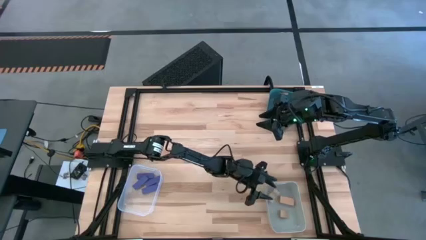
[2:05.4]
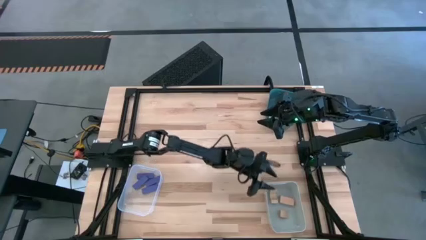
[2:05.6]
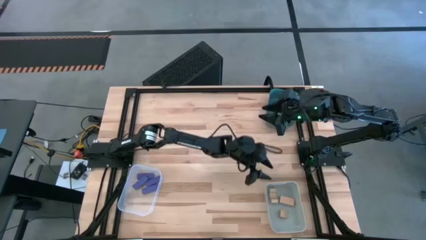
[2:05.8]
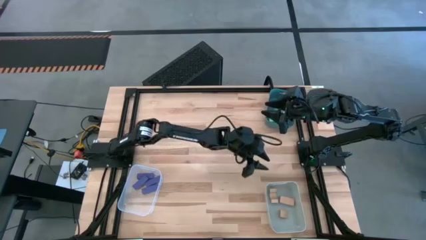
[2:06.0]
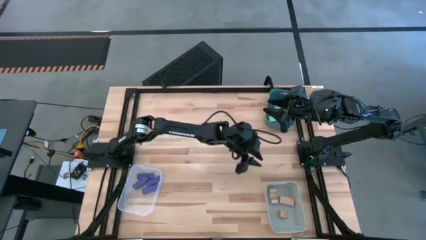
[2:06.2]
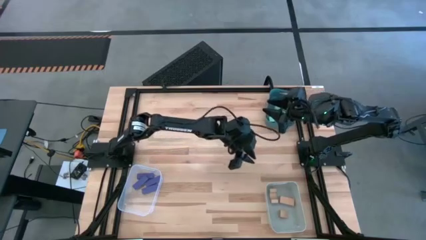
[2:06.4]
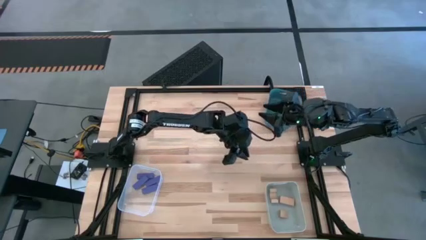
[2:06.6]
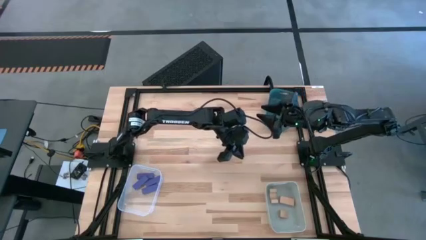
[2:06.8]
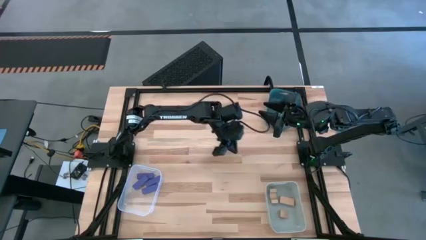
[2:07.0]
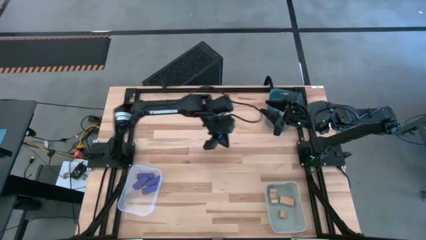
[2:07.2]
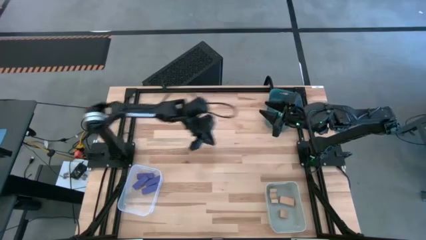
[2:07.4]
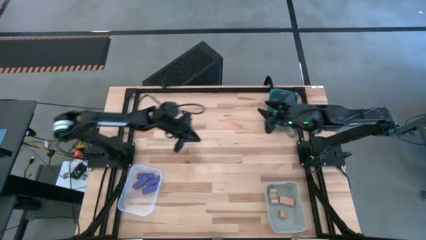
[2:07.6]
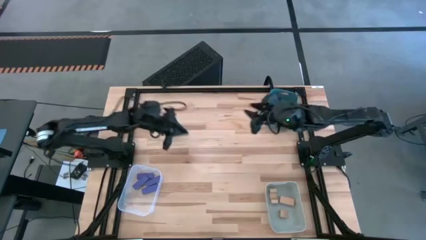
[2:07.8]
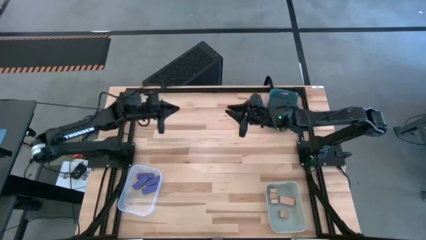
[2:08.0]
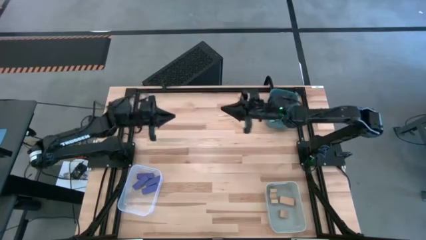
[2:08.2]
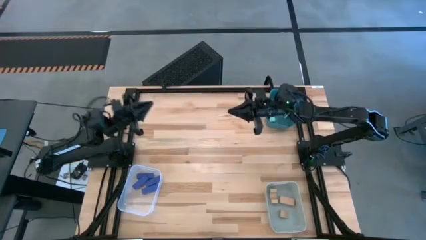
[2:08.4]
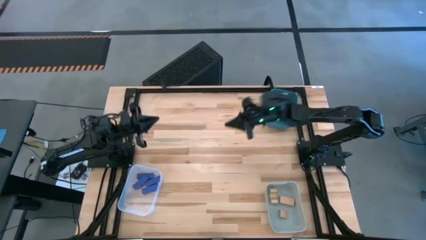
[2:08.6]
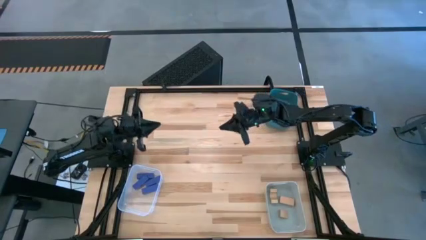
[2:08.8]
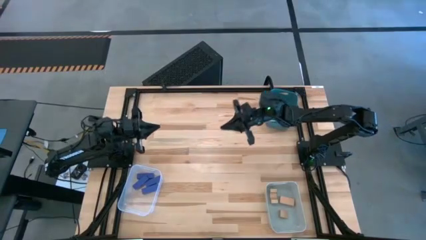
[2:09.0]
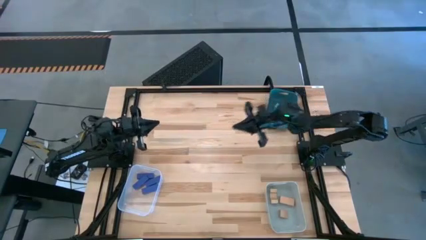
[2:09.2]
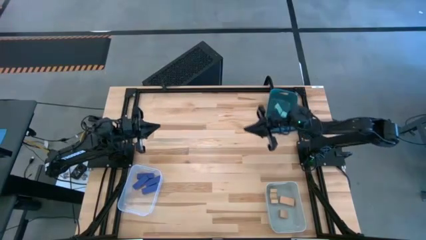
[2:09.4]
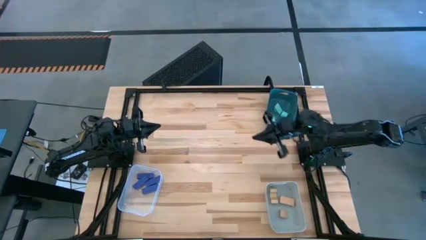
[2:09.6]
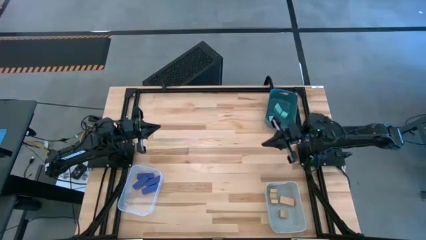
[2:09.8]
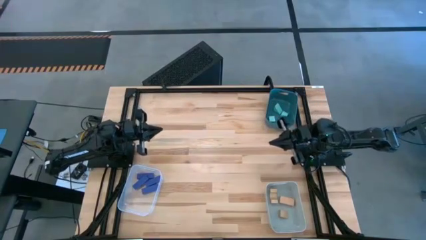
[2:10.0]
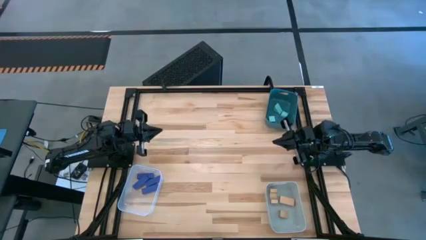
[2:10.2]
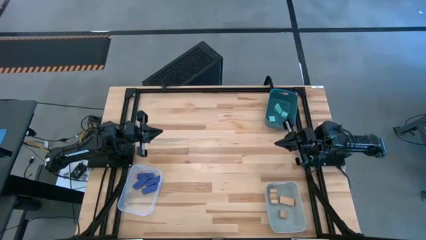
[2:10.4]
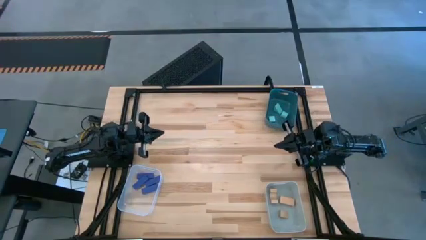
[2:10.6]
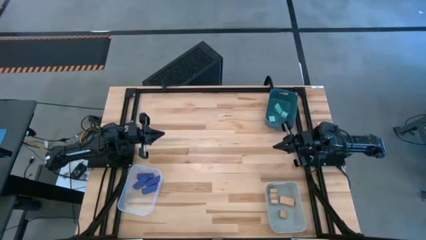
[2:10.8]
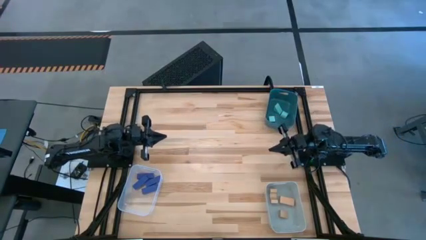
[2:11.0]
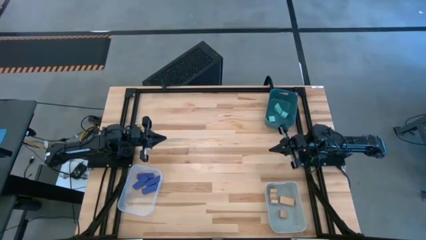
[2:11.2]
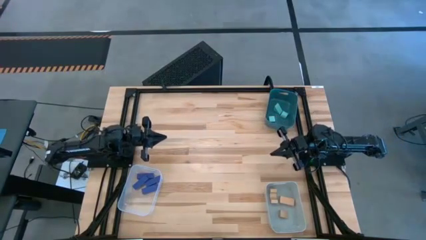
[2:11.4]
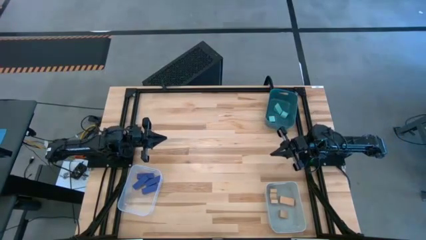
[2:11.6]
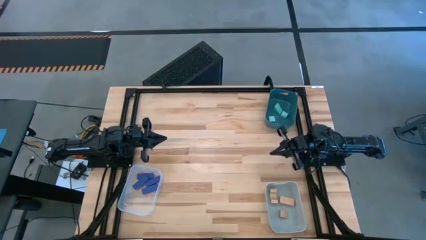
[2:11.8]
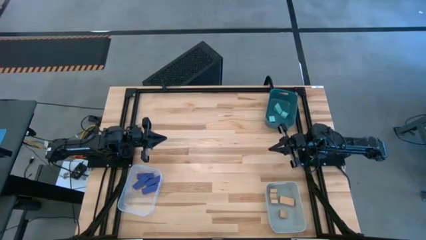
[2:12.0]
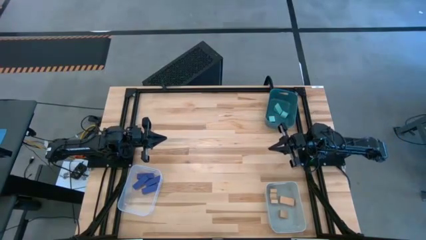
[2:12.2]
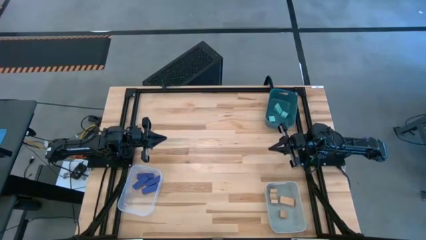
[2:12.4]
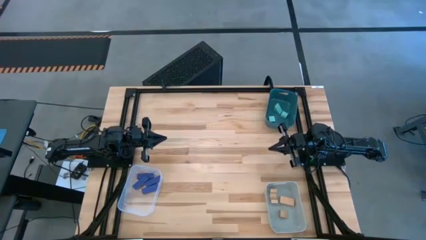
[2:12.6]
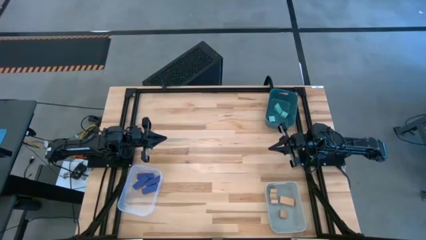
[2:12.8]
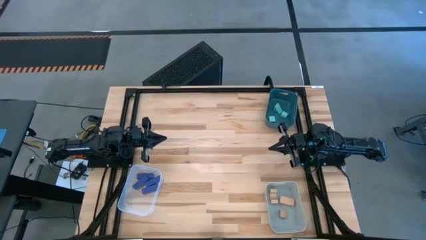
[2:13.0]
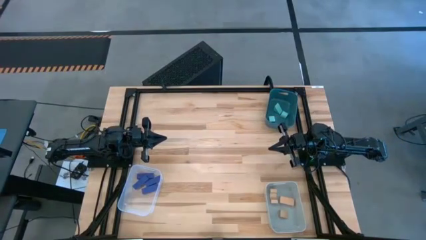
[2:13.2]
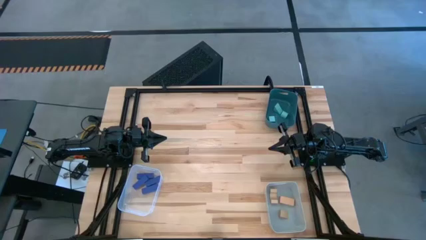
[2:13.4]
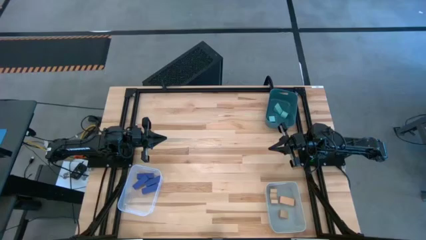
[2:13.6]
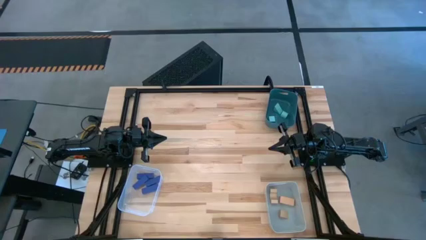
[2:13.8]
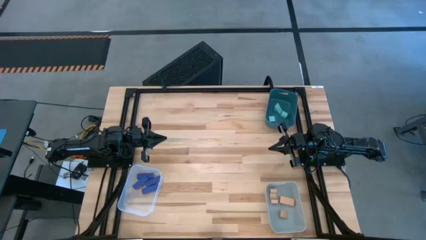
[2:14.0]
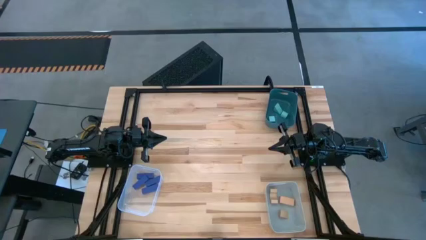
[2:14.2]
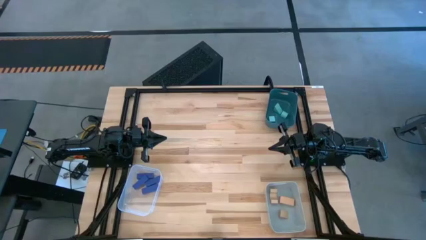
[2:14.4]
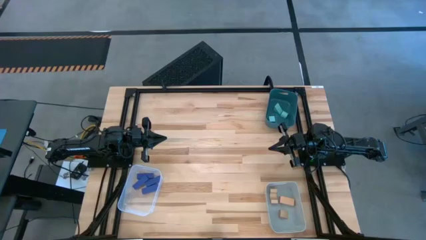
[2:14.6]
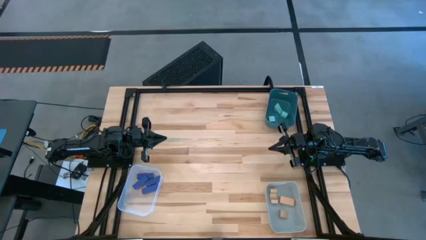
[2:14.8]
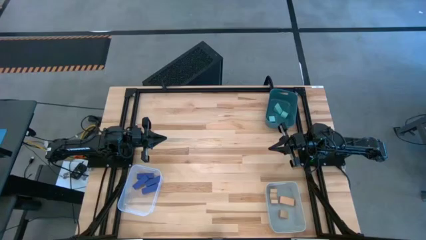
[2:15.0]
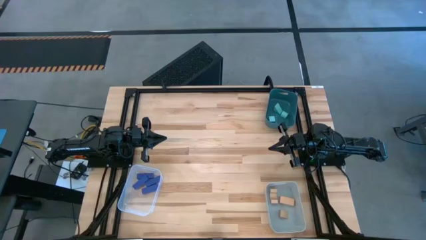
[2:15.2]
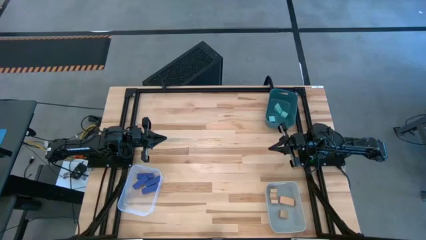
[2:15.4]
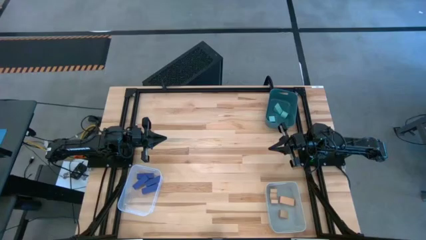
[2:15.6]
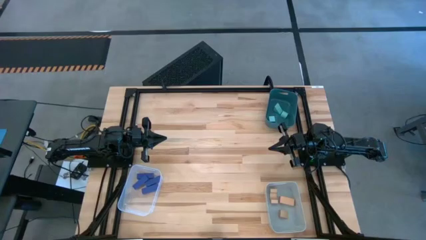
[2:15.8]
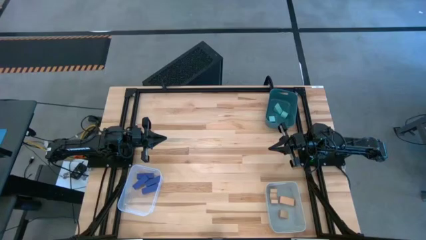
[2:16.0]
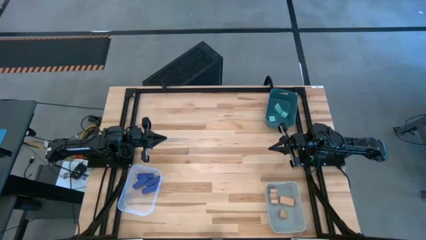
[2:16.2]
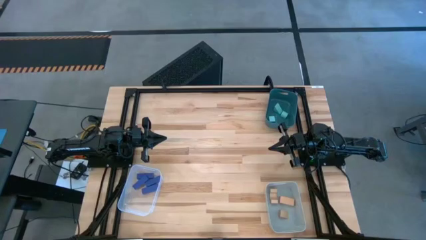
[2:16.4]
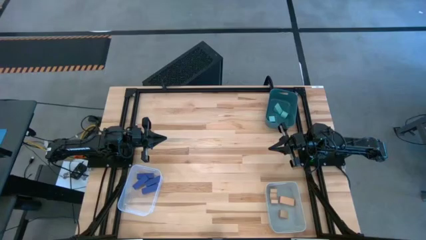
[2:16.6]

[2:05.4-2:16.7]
Task: Sort & place blocks by color
Return to Home Position

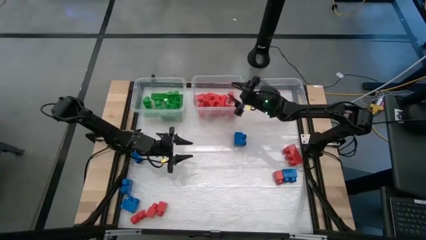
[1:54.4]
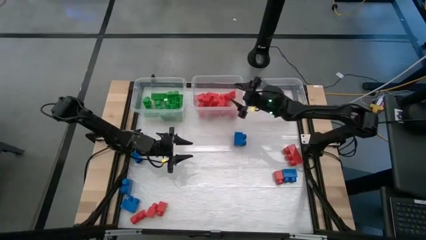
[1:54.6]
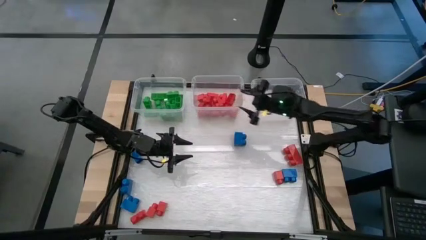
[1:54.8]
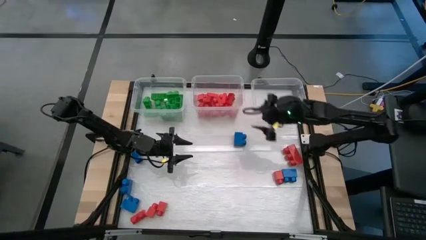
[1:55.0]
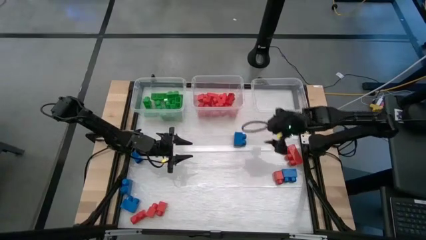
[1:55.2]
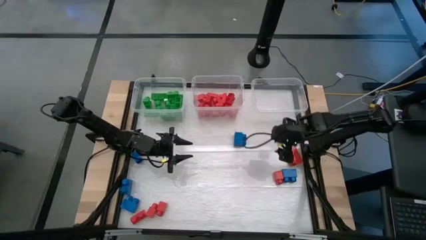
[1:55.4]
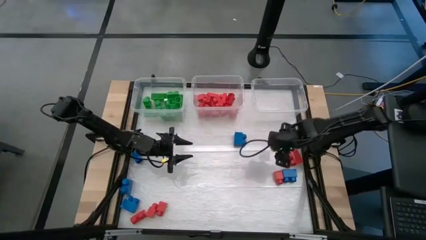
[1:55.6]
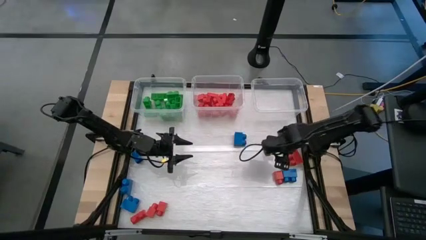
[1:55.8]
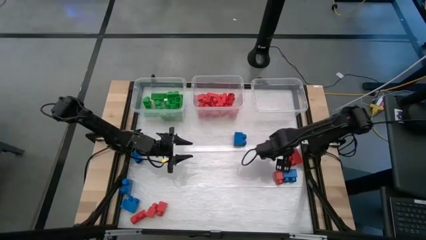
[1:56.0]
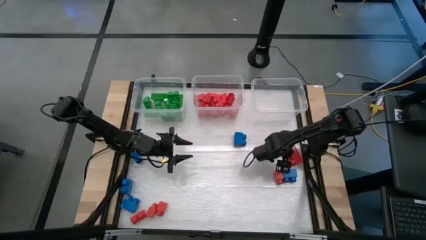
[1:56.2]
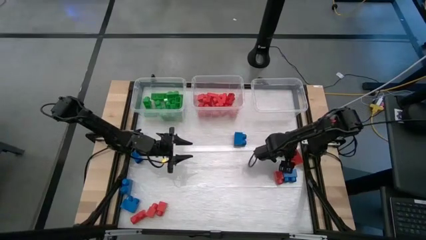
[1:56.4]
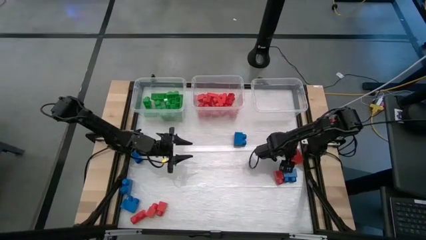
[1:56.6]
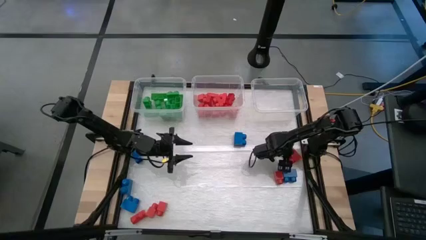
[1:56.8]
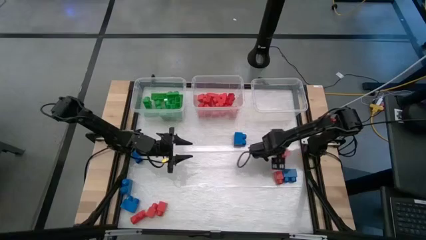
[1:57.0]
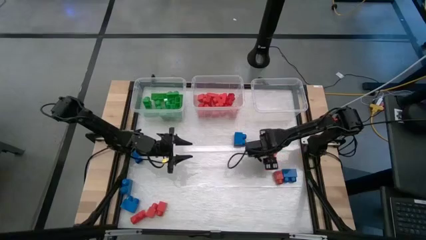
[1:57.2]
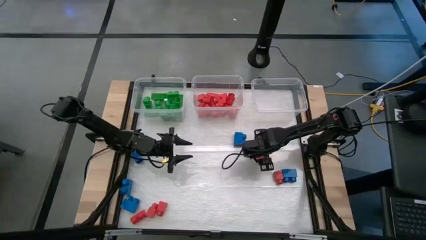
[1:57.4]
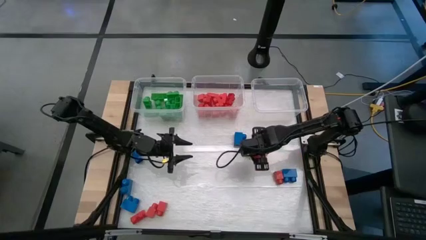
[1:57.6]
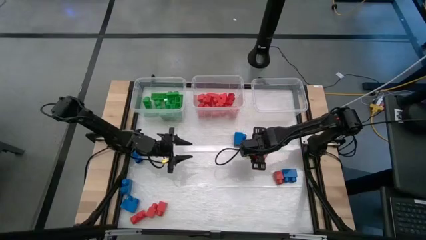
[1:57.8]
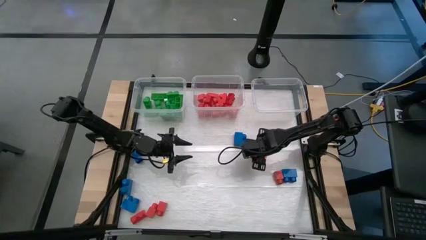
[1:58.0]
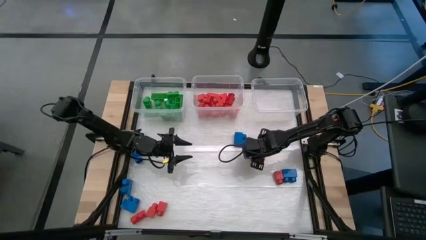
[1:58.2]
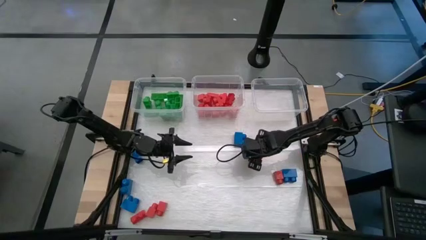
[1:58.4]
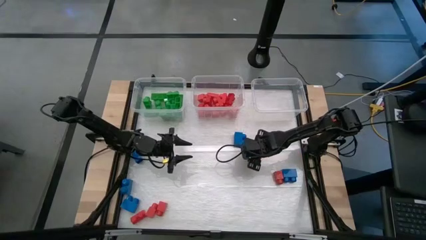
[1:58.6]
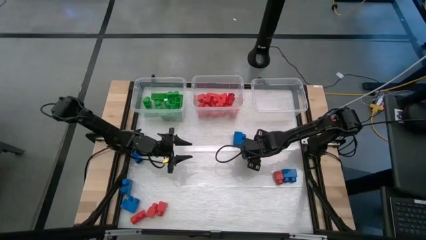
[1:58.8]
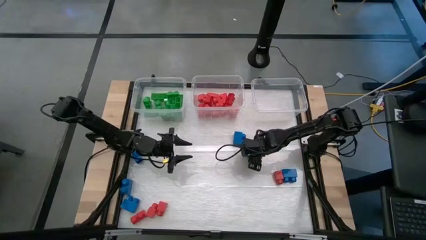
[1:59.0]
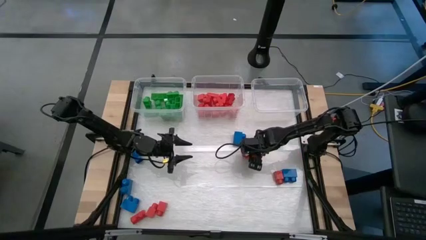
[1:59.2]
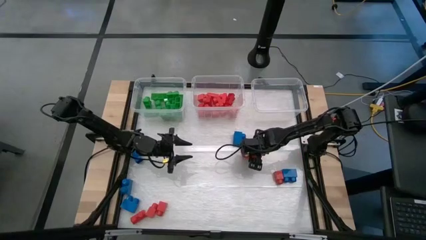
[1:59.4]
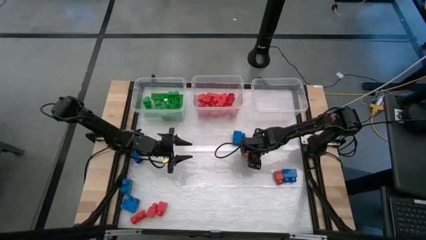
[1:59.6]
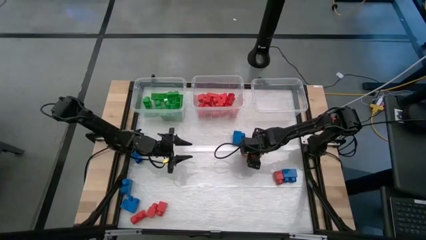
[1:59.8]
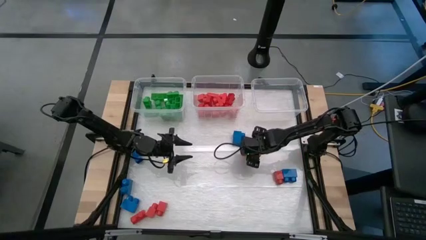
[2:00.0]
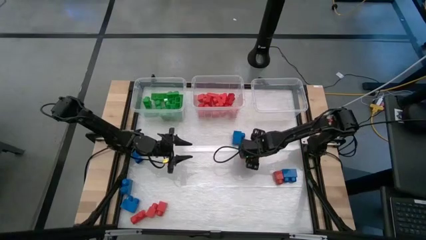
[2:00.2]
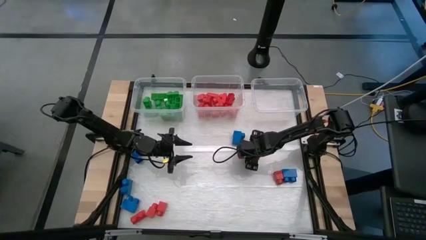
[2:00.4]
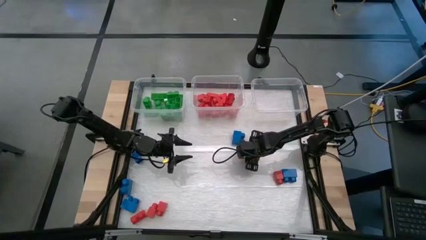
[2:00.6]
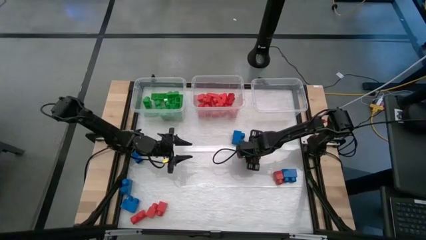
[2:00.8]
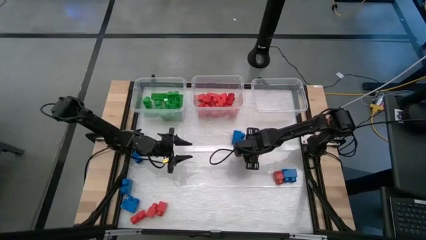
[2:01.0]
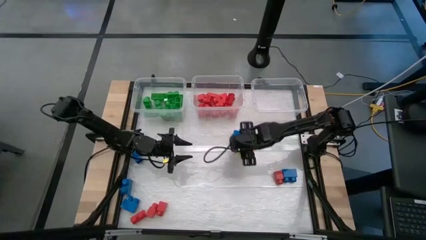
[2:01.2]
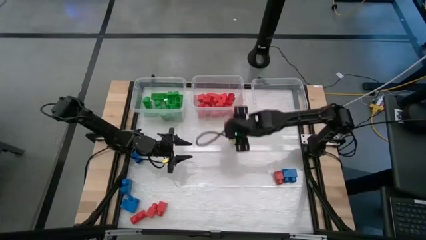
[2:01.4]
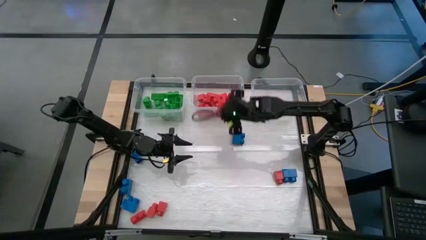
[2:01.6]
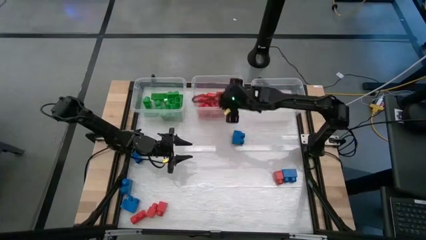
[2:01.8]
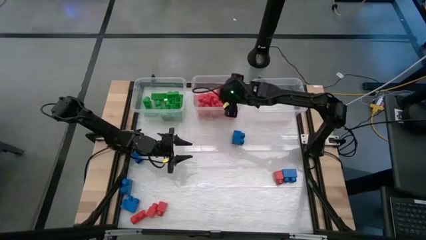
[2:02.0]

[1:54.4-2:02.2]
Task: Sort blocks
Put the red game piece into the middle transparent bin
